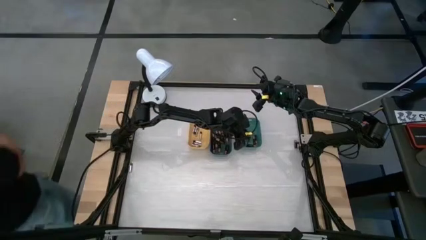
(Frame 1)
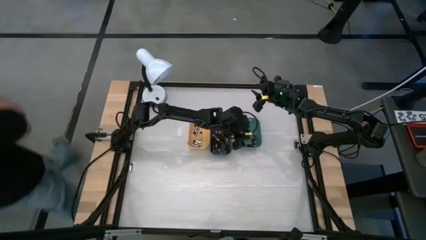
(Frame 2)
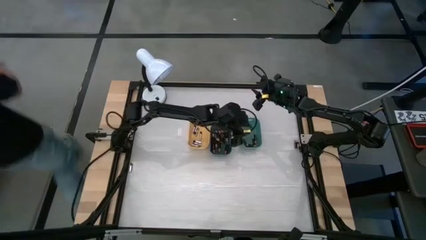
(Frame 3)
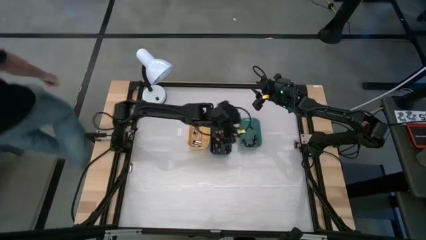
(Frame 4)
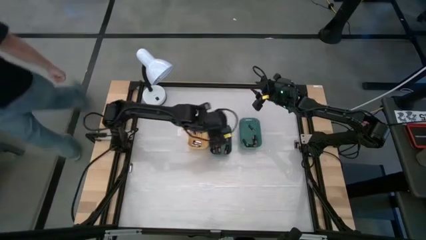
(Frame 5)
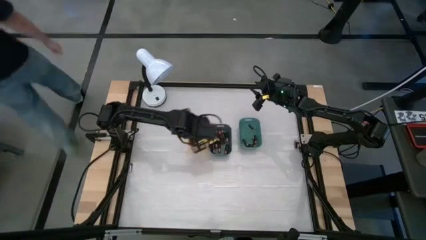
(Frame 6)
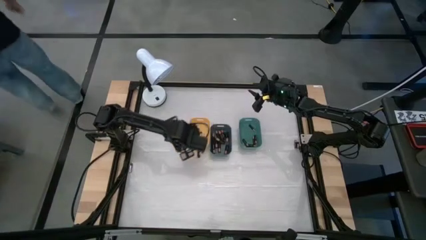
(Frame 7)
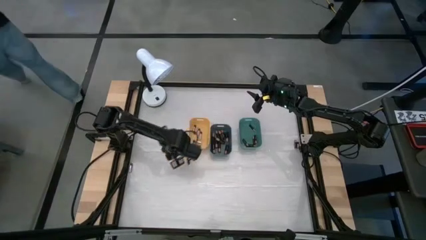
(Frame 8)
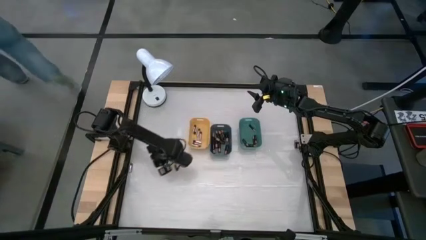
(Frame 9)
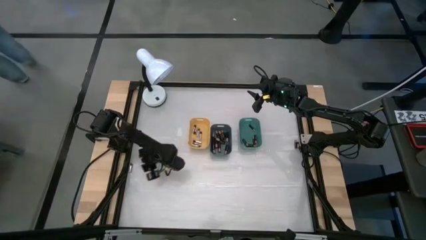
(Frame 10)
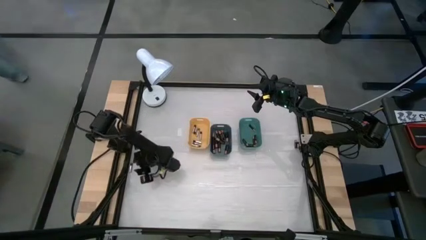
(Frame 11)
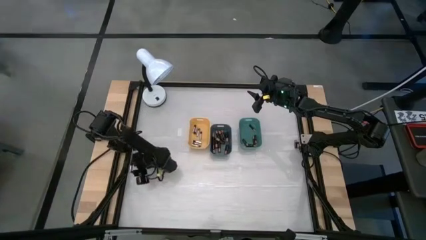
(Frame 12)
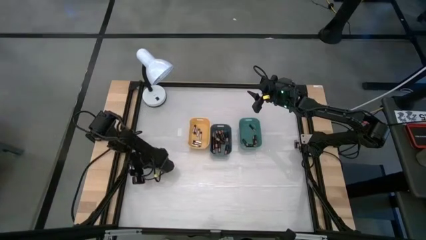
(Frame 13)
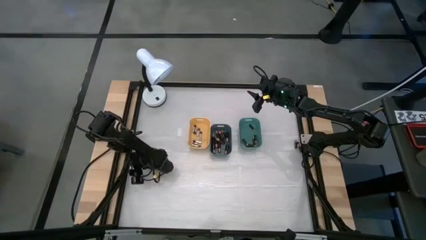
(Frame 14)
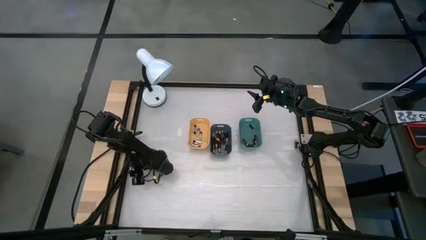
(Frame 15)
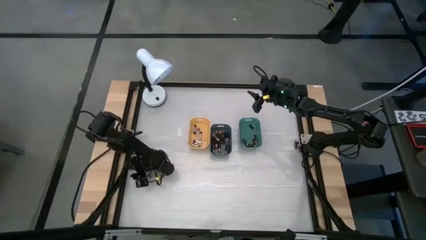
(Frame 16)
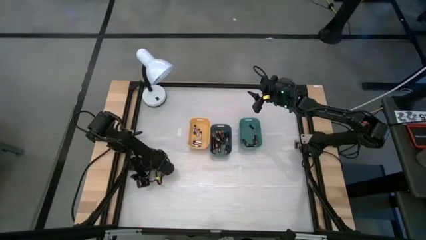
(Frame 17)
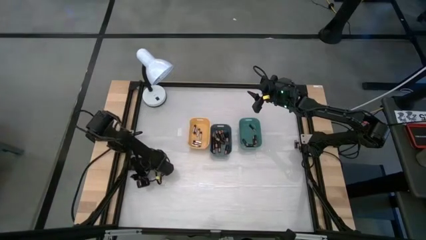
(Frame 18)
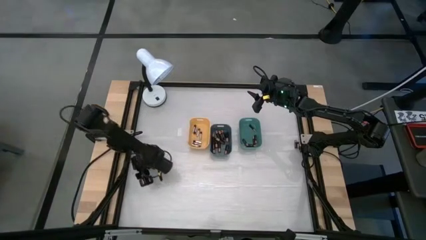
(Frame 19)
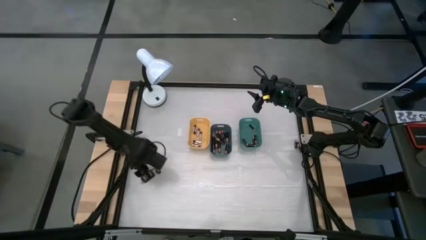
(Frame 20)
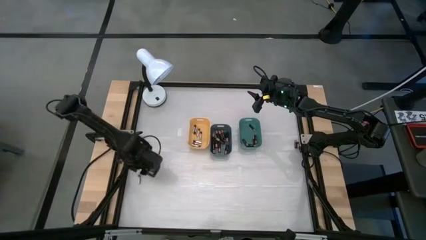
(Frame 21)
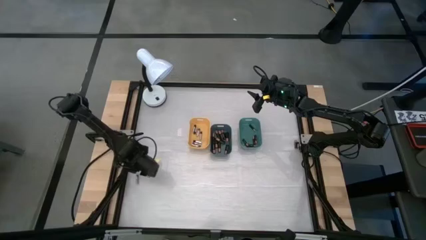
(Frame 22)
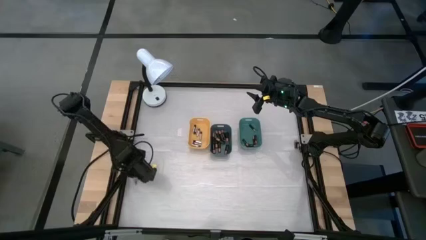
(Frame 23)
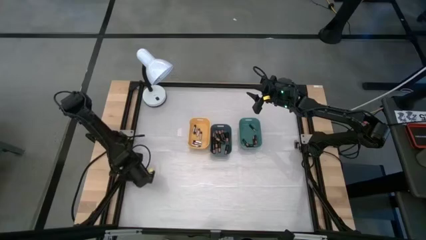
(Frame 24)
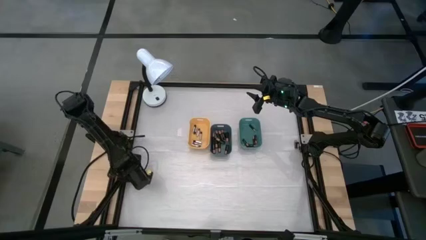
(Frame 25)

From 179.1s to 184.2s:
Task: Sort batteries
Put the silver battery into the yellow bin

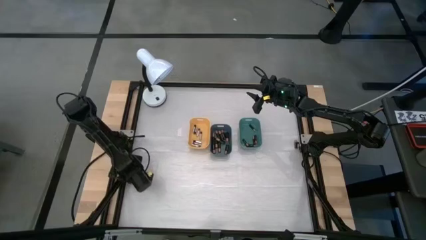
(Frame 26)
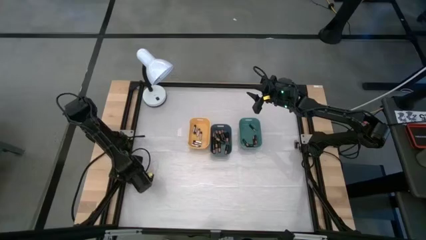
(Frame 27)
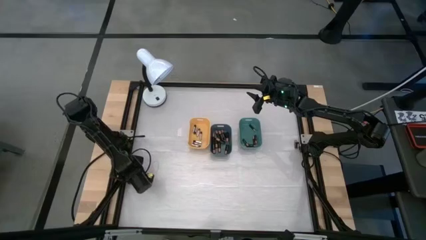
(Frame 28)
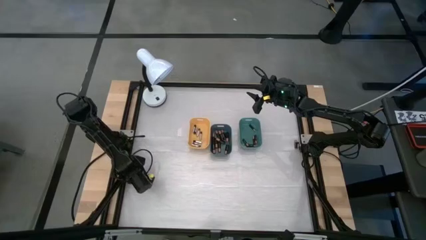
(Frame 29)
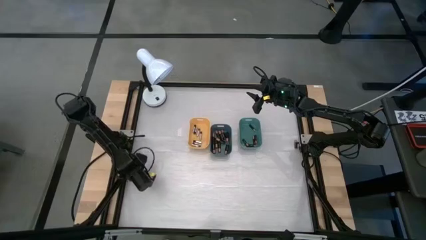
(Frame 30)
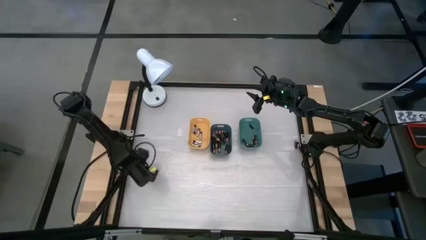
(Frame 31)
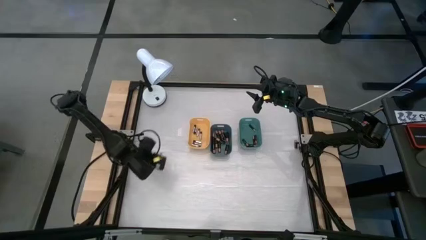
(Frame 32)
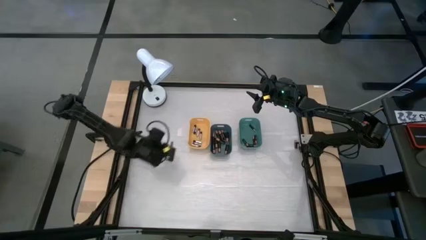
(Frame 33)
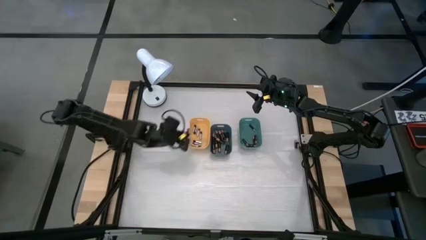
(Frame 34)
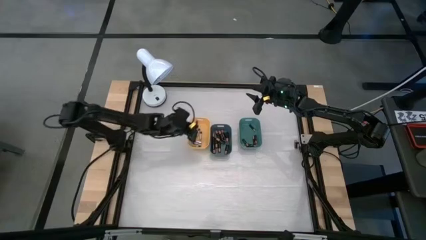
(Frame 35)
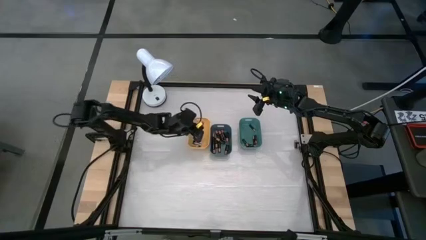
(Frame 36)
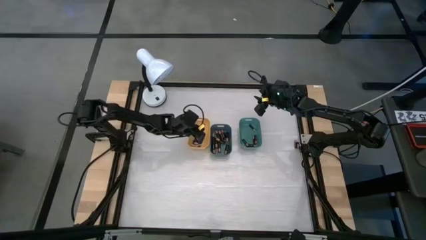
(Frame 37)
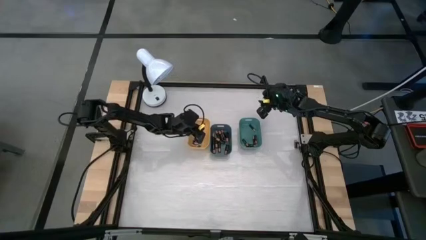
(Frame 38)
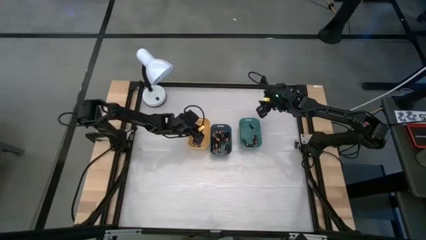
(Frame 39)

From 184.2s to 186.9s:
Put the silver battery into the yellow bin

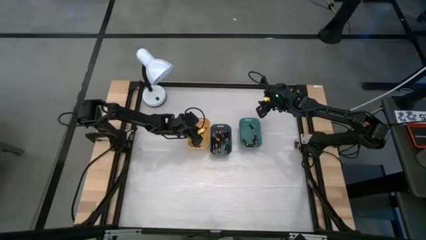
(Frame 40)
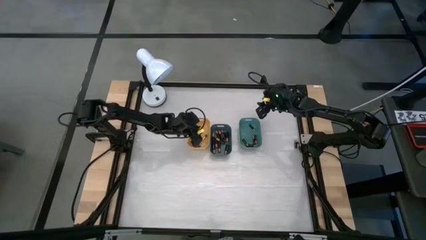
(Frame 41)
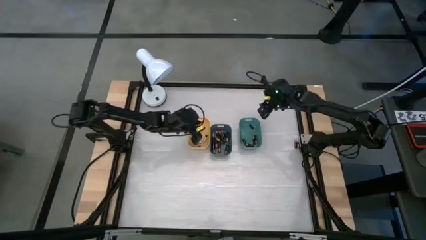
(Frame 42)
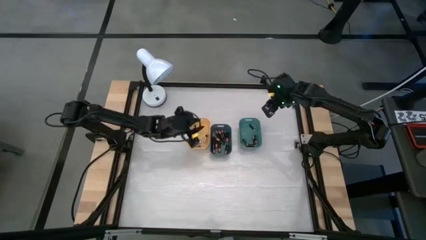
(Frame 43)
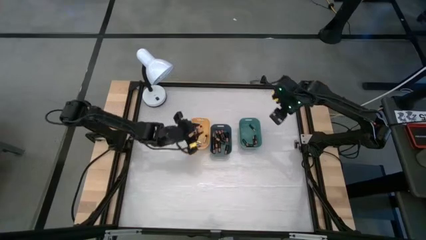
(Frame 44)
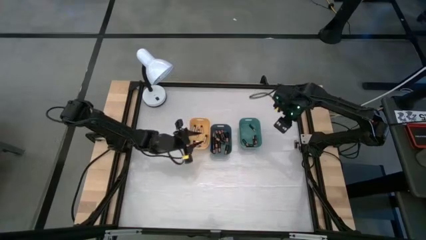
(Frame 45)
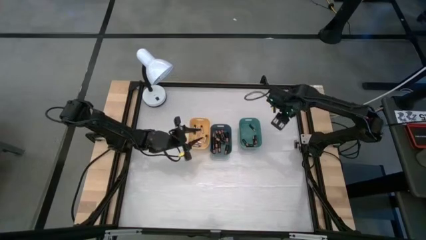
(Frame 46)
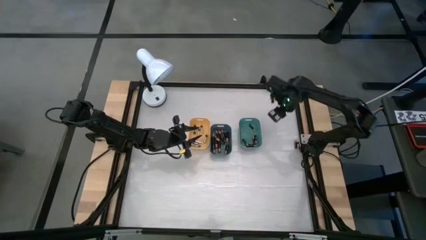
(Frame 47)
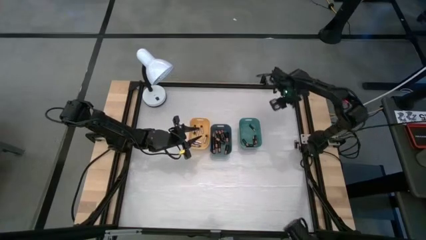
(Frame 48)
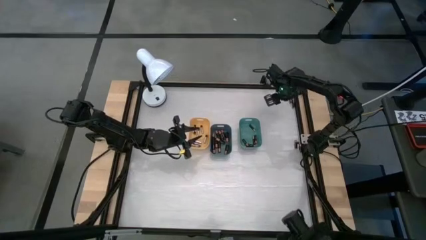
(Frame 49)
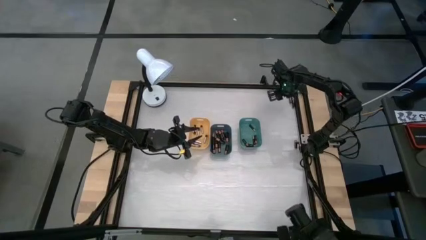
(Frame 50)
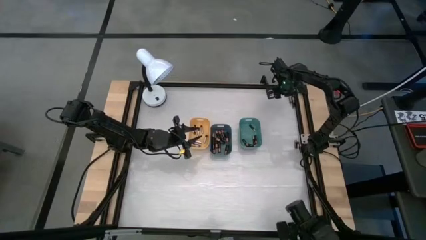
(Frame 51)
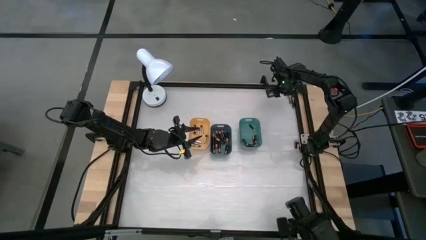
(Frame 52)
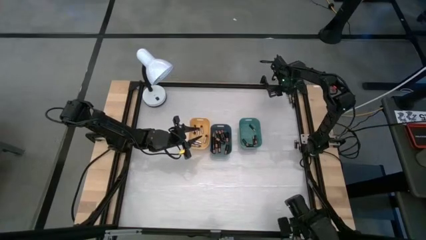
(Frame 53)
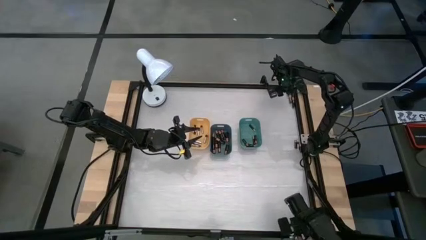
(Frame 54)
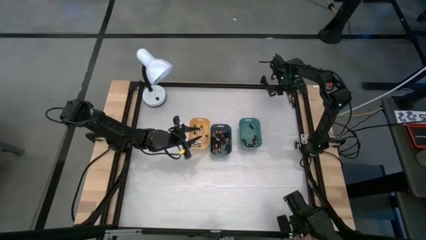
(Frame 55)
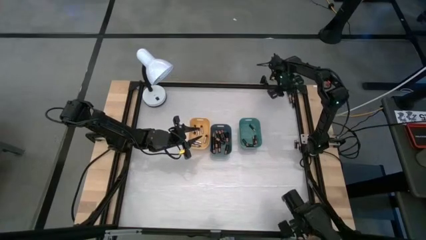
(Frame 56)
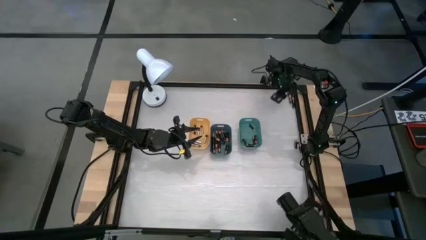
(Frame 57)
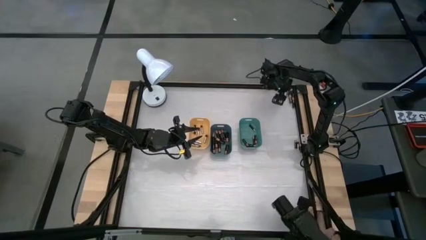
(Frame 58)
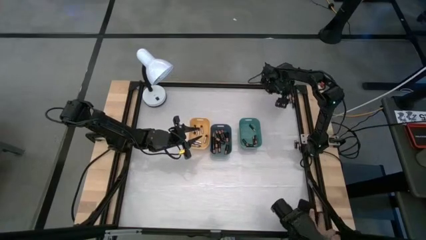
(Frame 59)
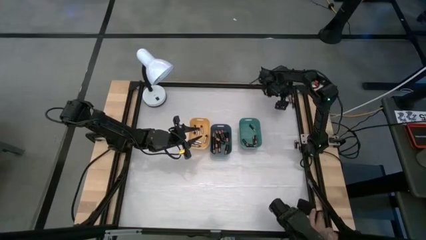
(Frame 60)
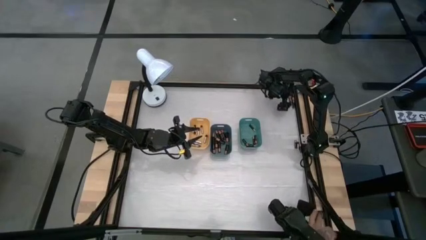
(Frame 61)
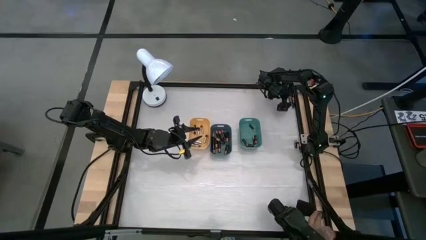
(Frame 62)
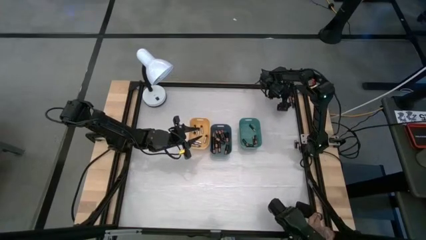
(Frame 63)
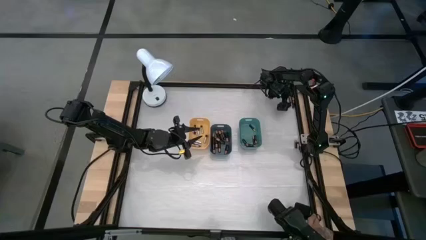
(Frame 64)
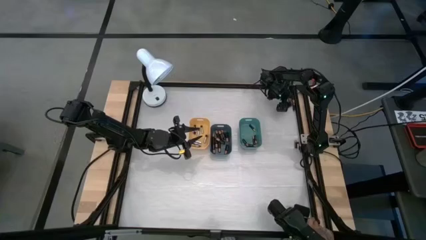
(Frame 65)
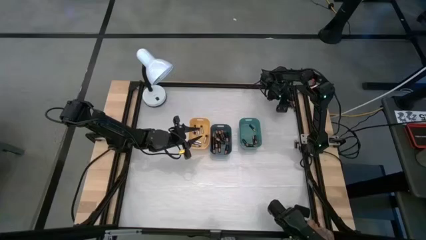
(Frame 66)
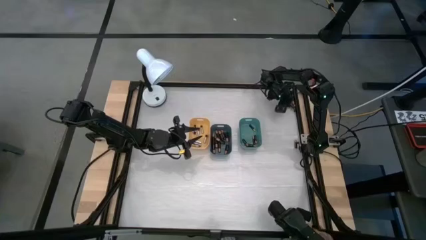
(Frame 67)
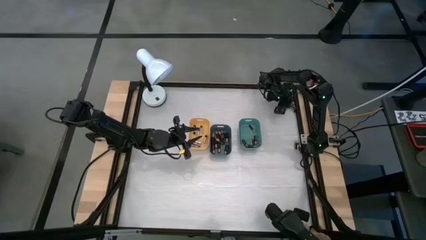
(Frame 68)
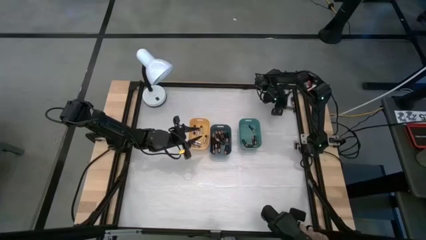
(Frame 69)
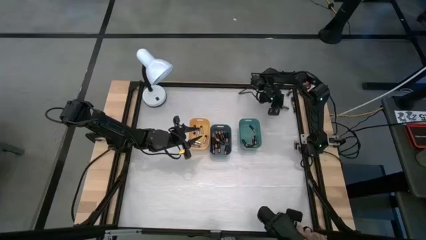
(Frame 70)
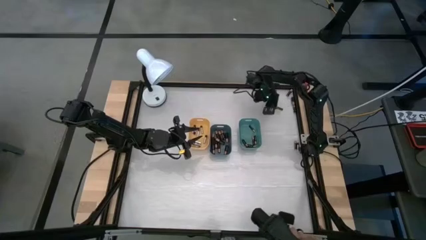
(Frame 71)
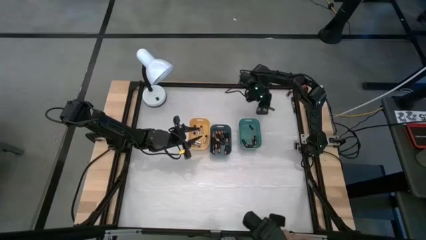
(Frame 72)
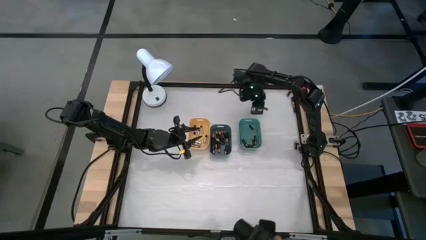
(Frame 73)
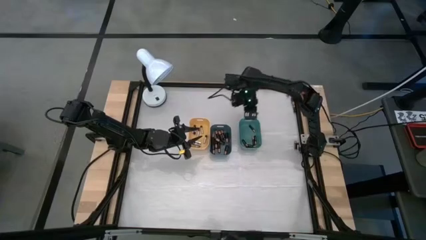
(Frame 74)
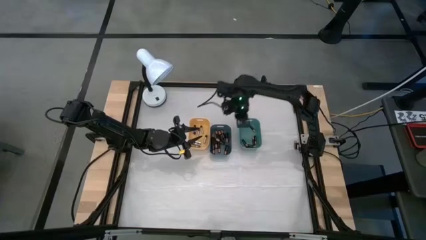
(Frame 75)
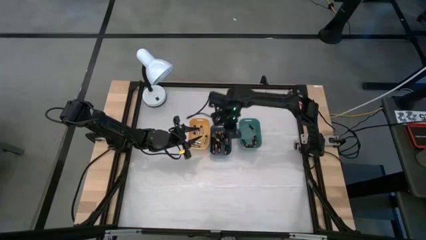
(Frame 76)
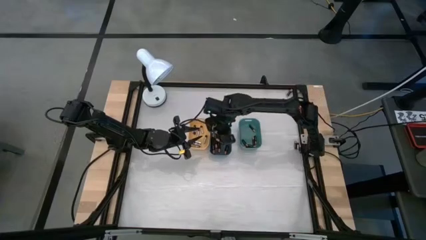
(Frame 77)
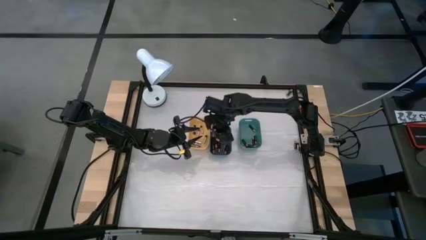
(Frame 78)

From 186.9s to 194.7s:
Put the black battery into the blue bin
